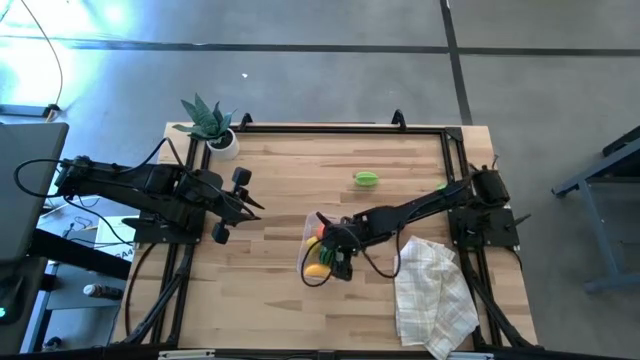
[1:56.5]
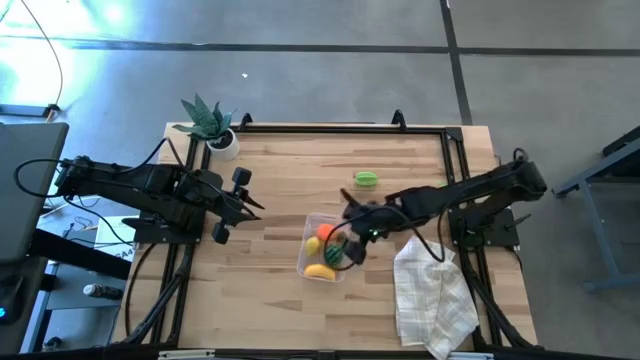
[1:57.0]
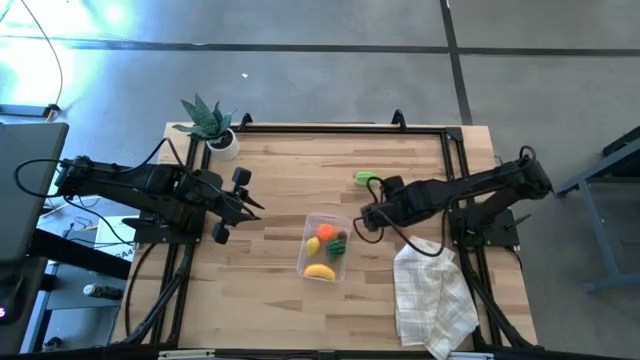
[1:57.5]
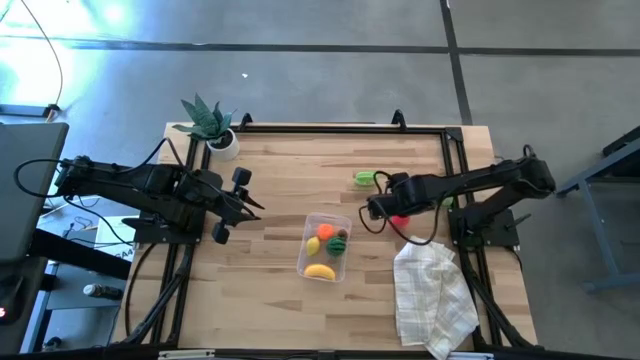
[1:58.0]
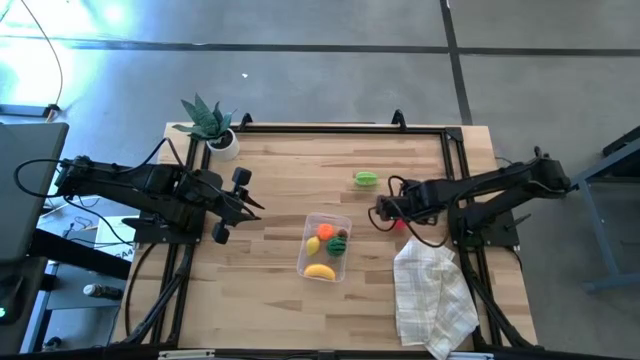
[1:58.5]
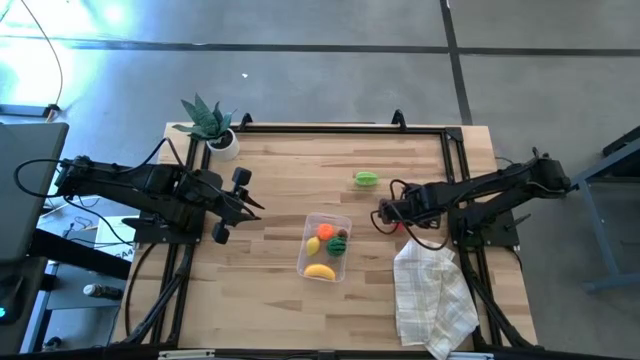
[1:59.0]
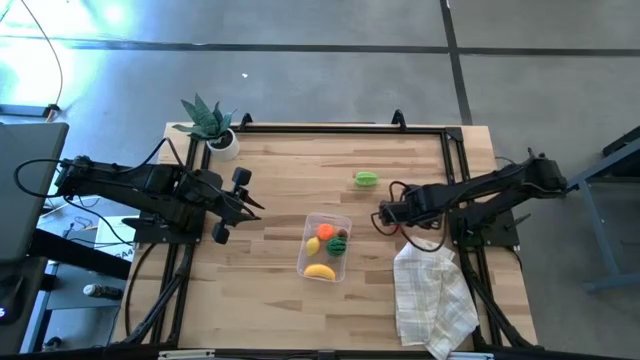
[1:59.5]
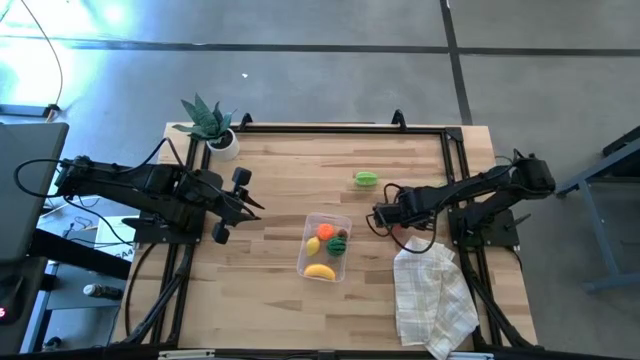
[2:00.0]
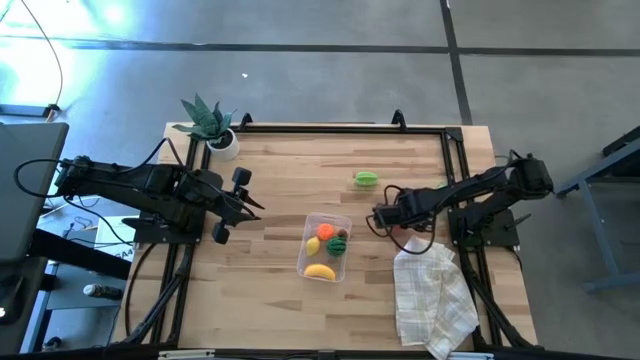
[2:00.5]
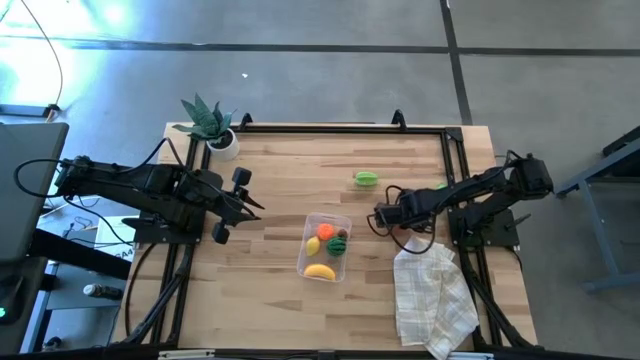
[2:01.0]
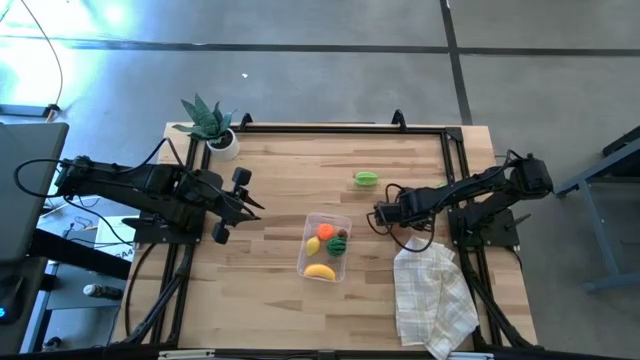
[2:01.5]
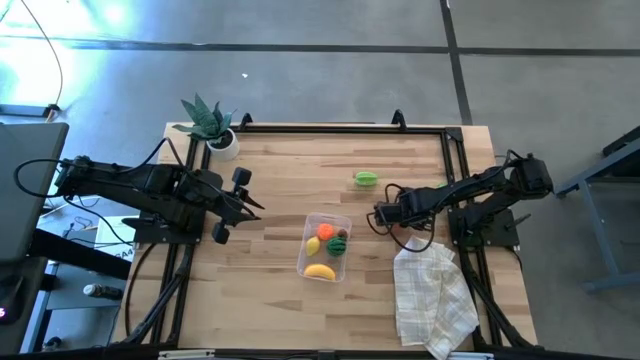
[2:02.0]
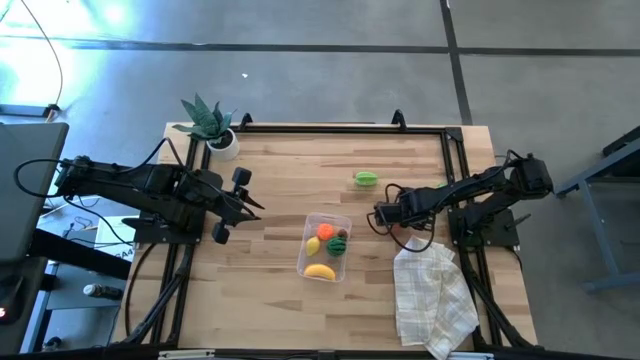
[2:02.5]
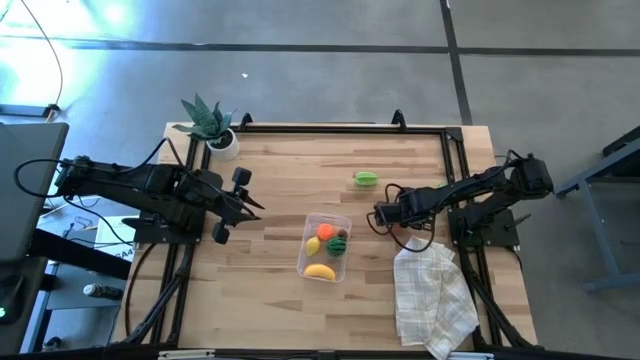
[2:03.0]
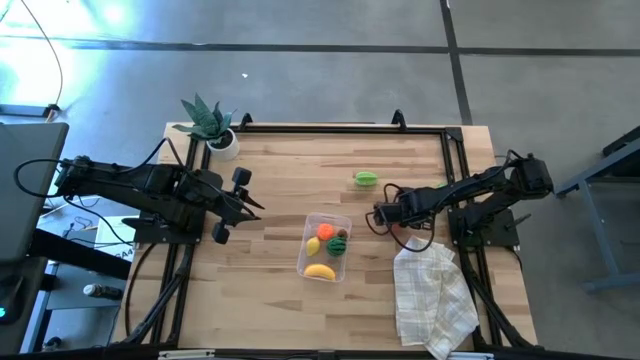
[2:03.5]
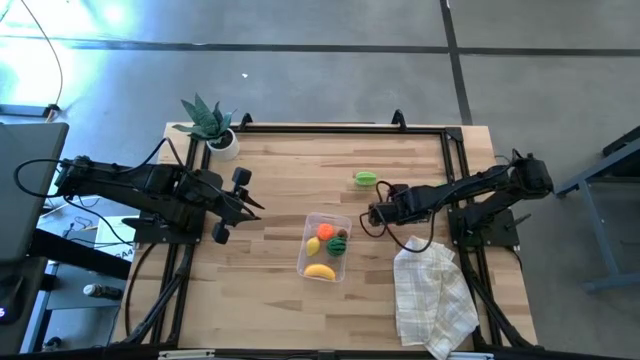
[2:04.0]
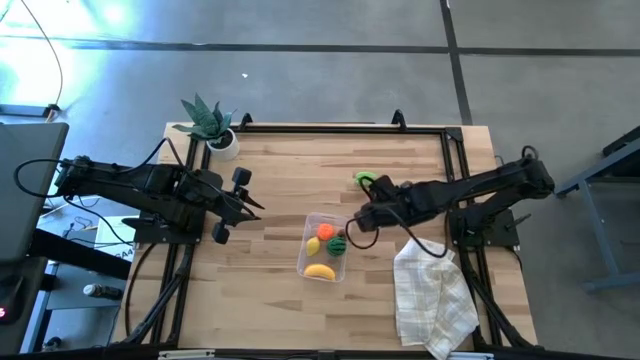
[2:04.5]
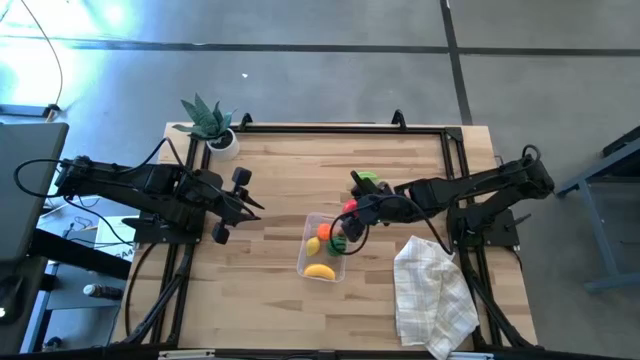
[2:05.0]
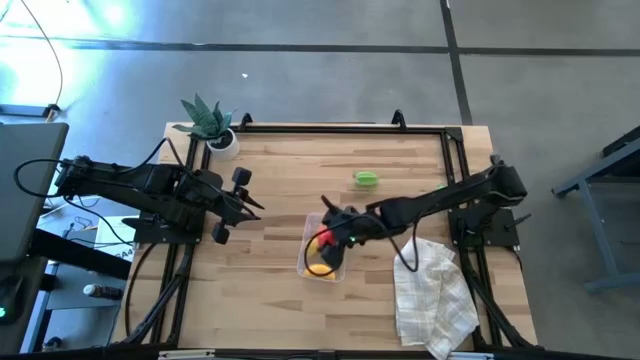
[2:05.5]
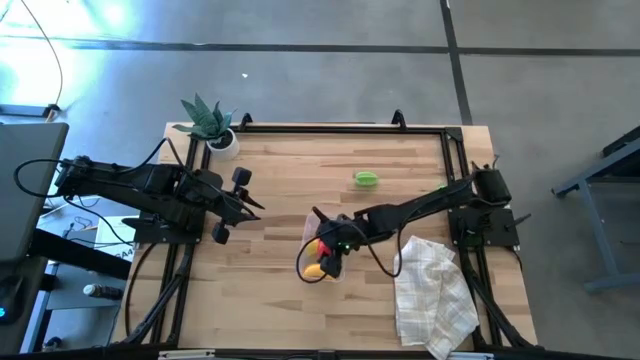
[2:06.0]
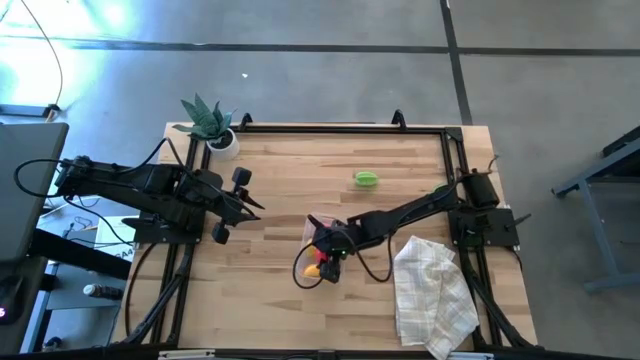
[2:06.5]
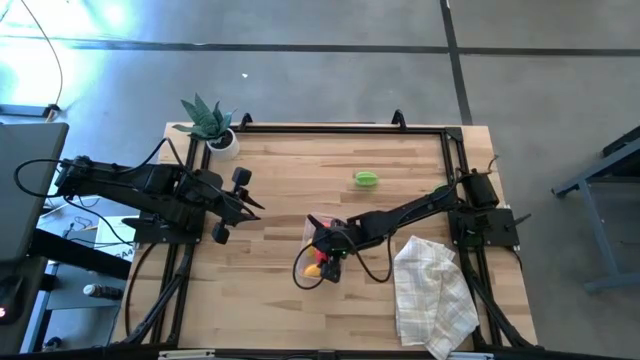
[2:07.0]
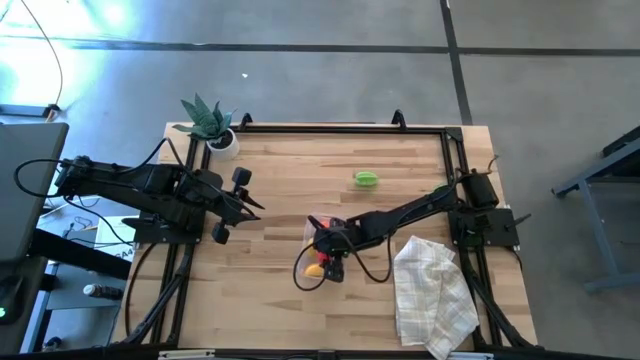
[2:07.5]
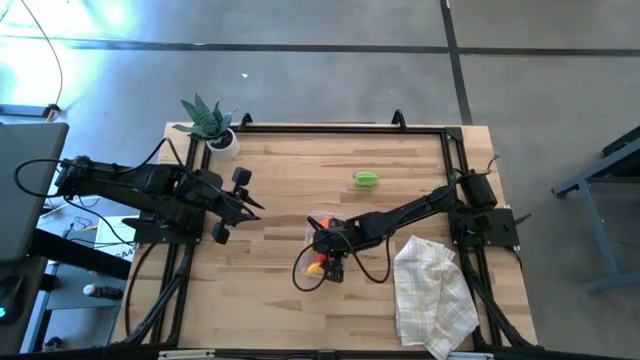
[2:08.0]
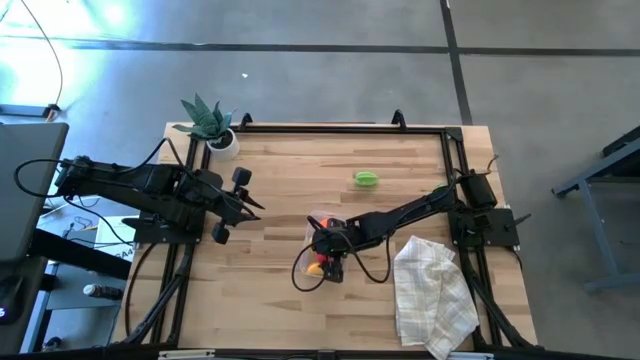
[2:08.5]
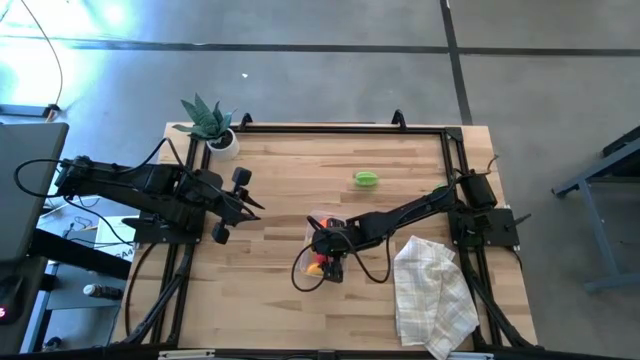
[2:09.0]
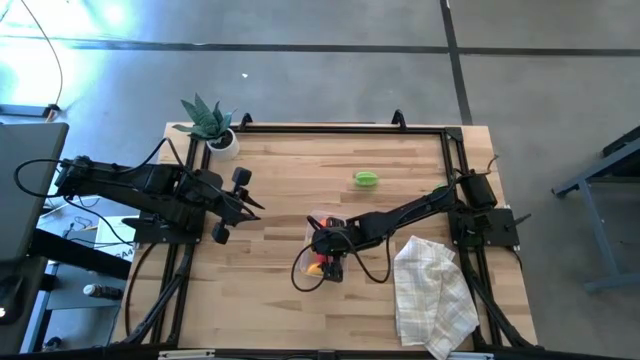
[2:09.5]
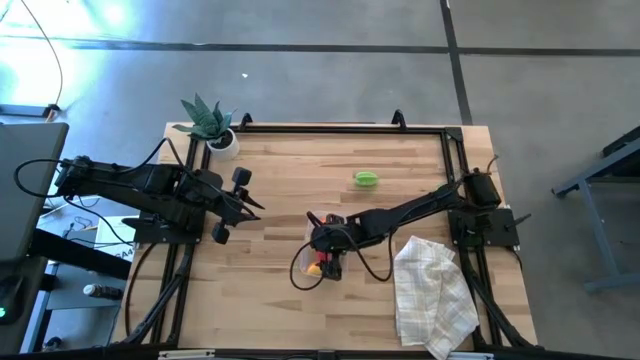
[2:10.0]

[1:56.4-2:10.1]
Task: Pick and placing Produce into tupperware
Put the apple into the transparent bin
